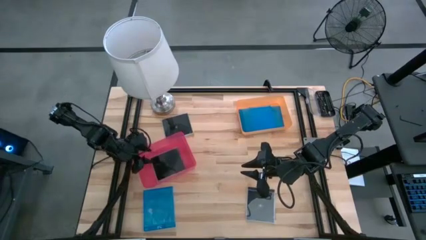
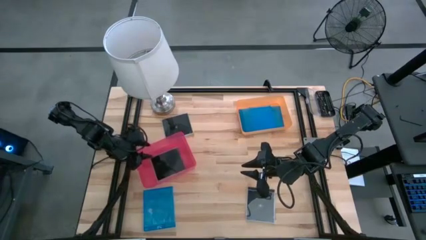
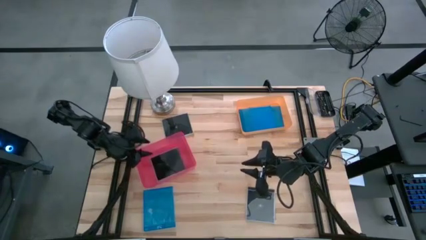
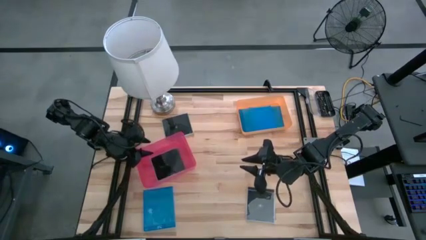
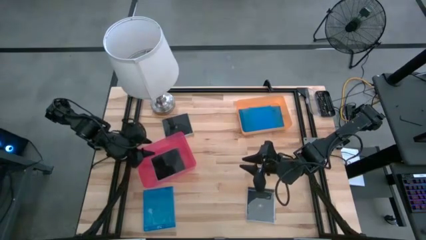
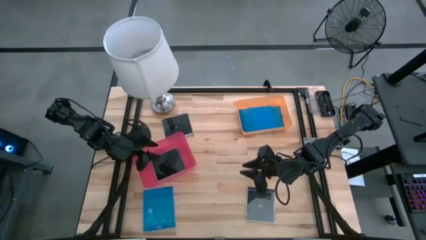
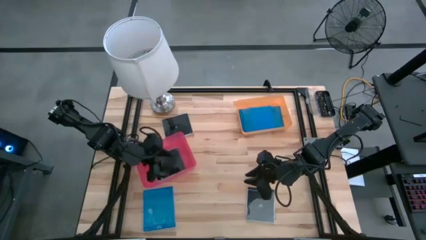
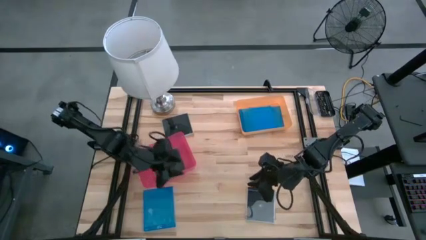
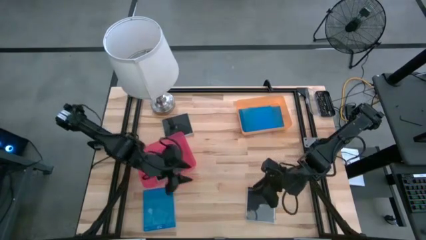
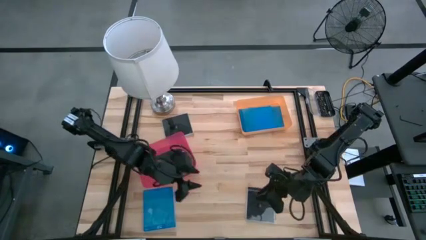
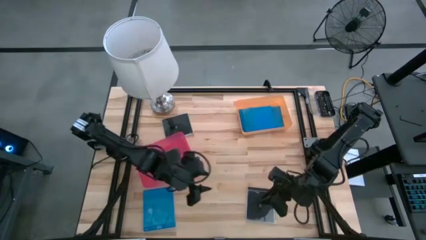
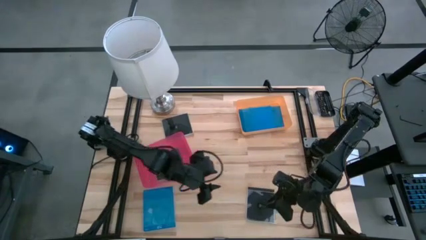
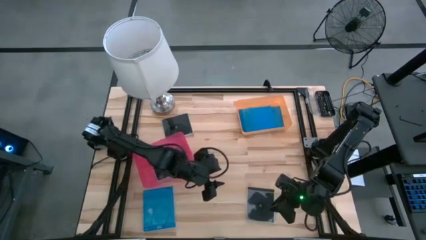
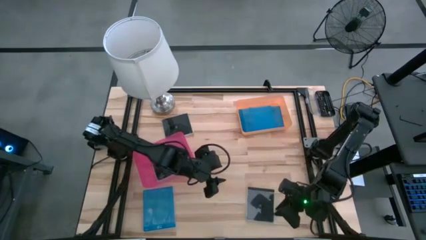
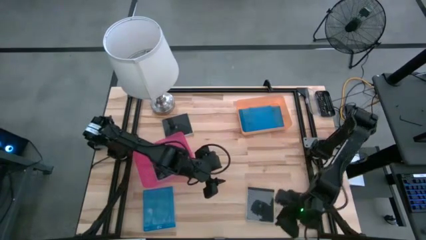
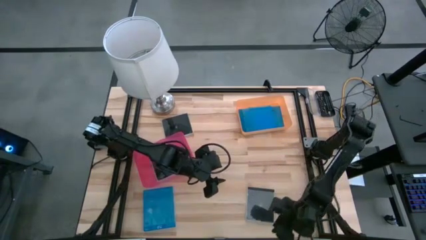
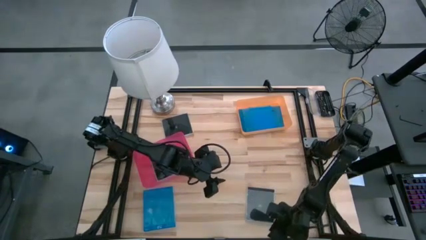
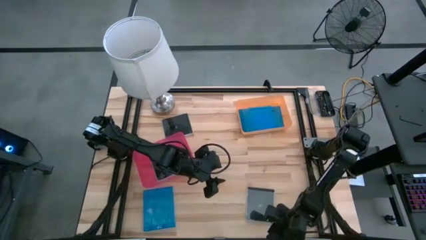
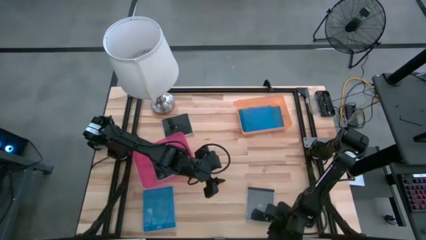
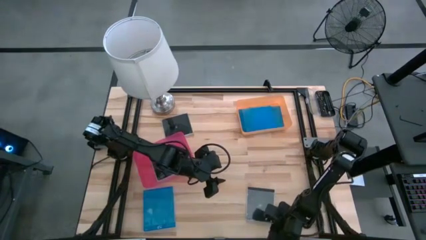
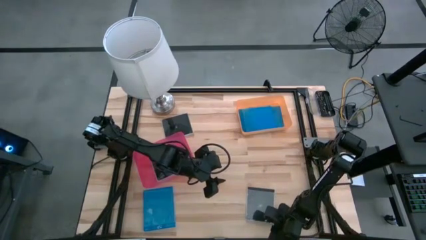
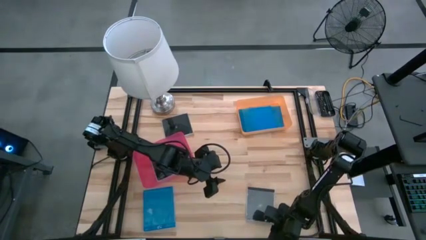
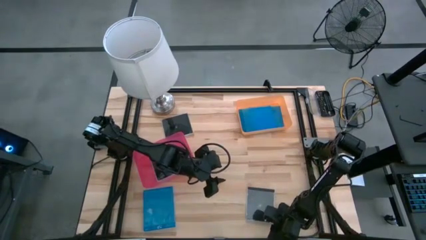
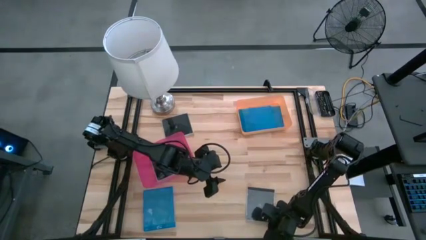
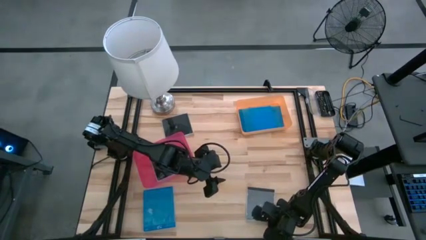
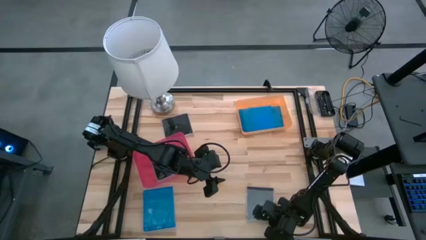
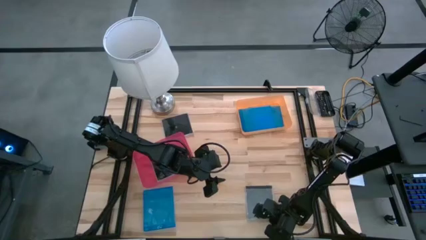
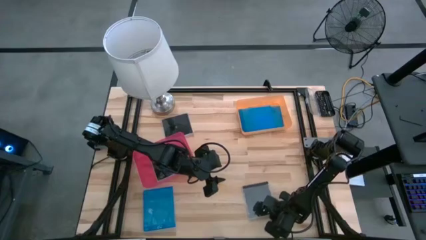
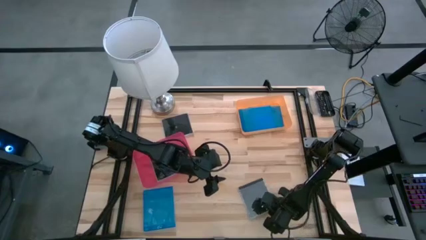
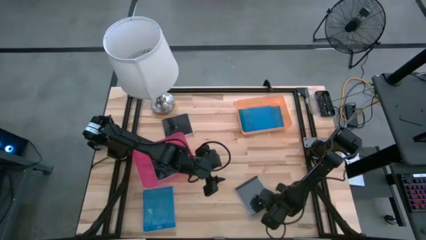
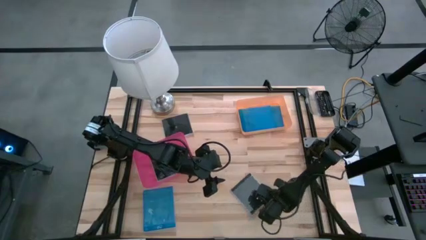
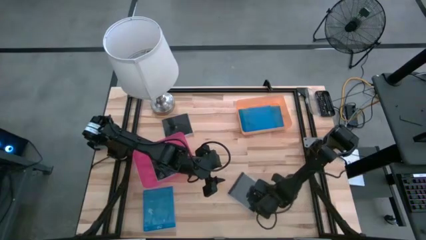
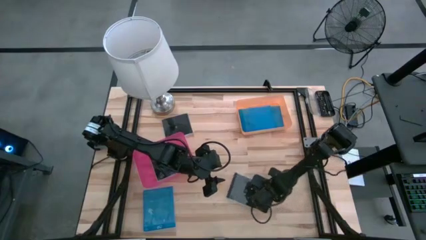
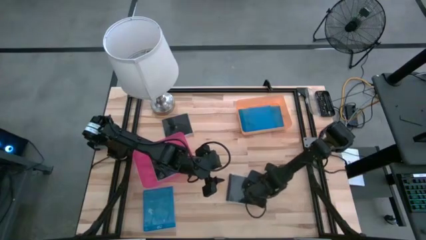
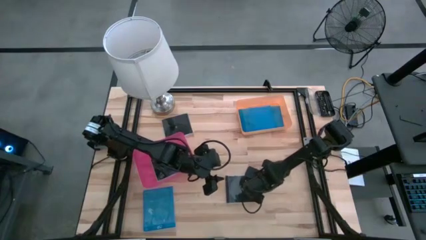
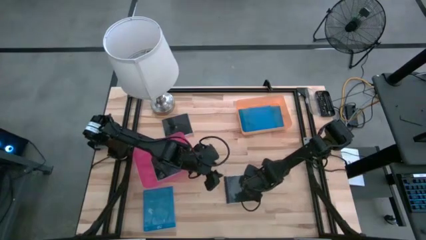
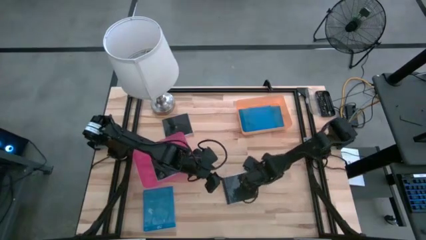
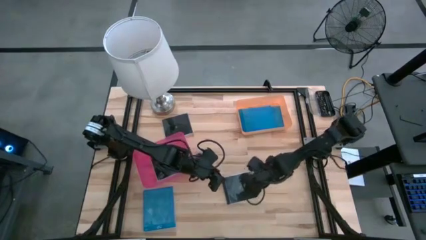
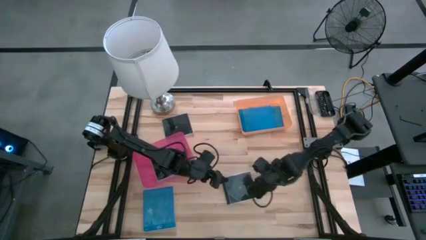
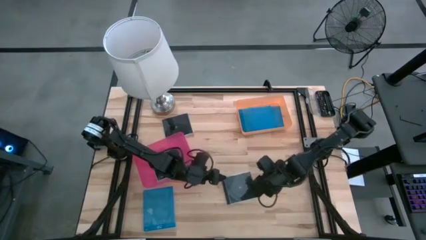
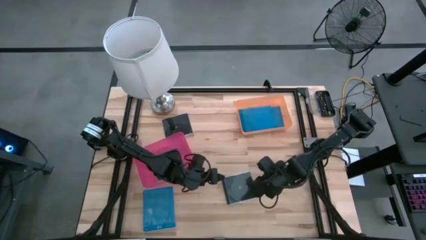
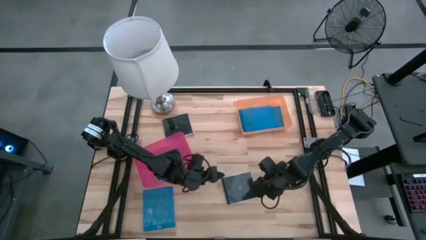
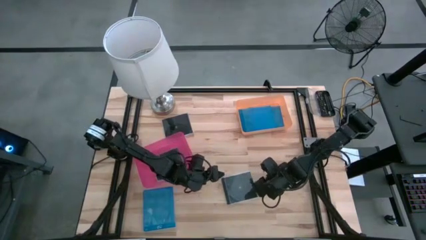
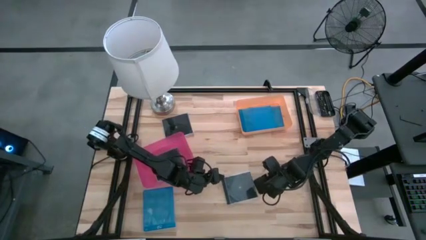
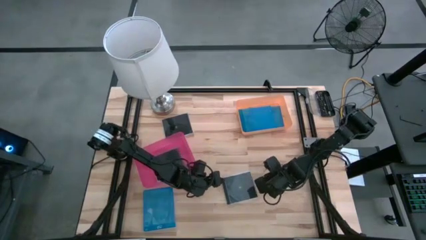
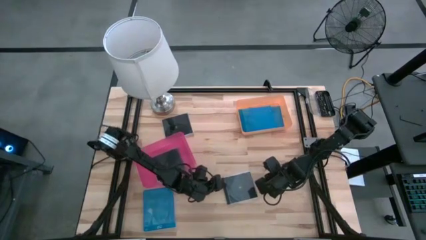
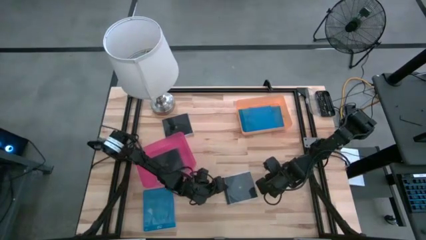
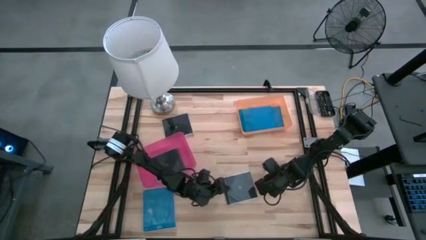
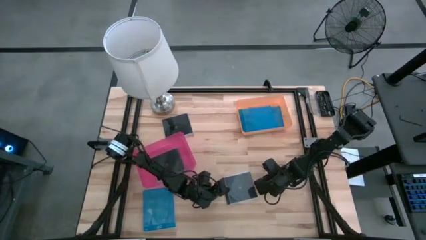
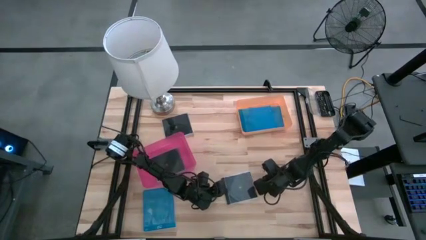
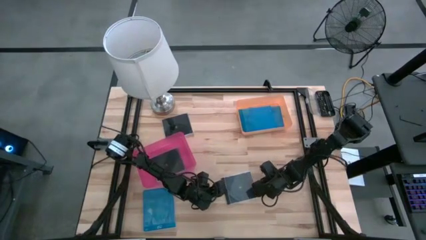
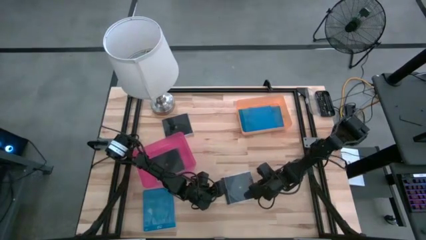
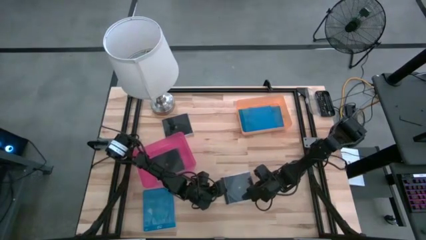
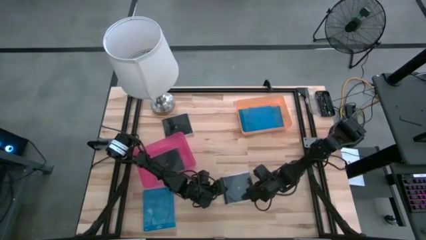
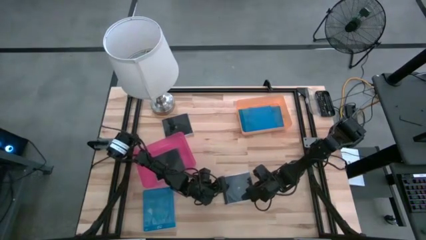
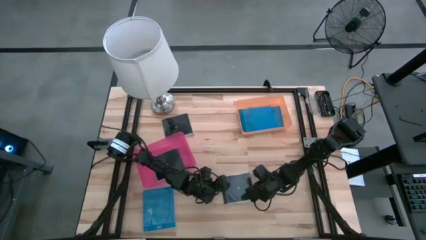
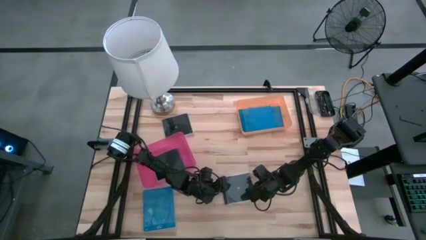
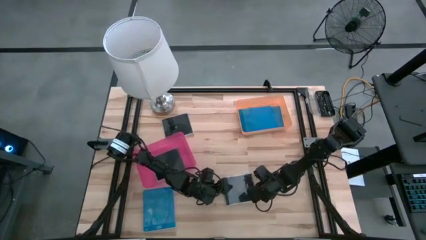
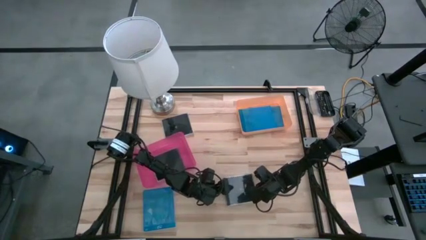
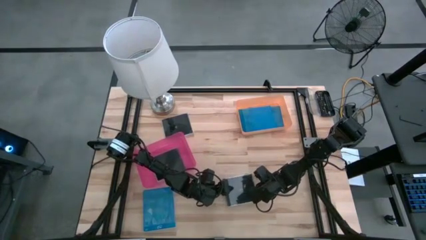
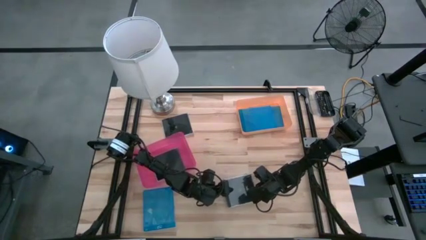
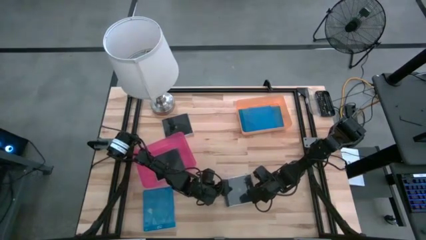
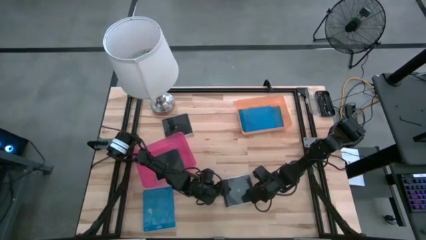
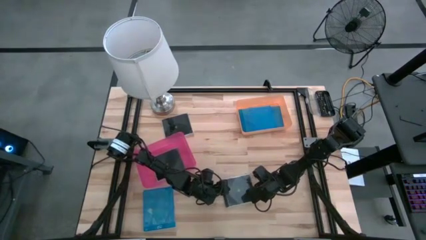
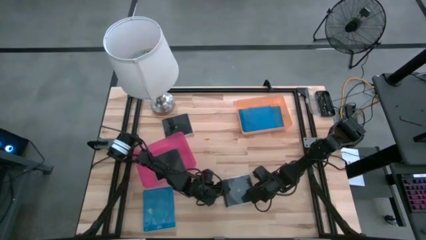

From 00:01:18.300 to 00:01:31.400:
Task: Pick & place jewel cases by type
Put the bottom black CD case into the pink bin
